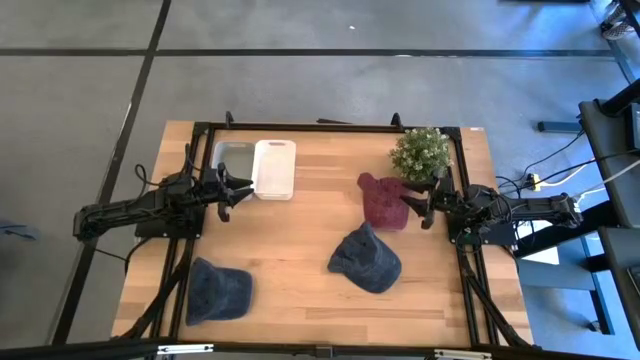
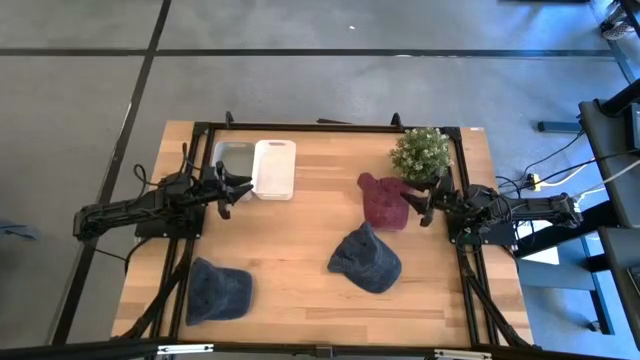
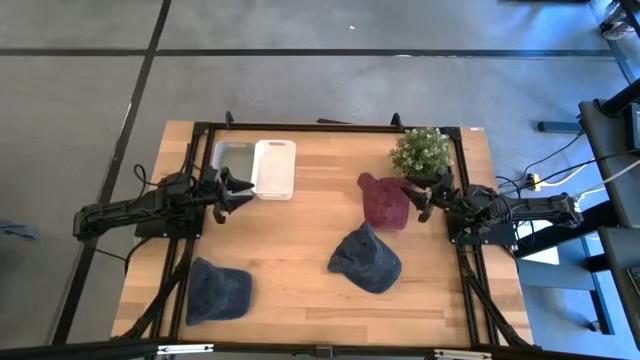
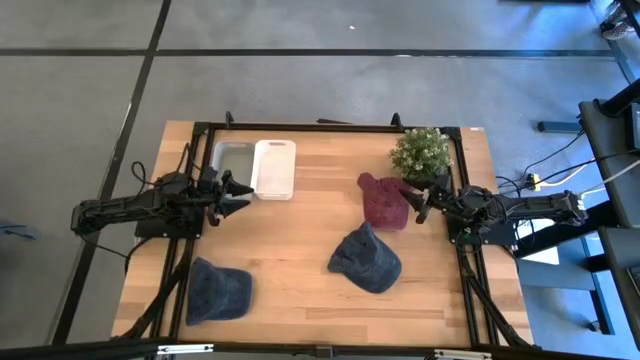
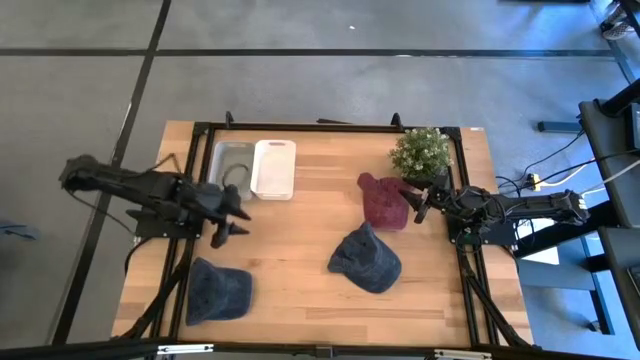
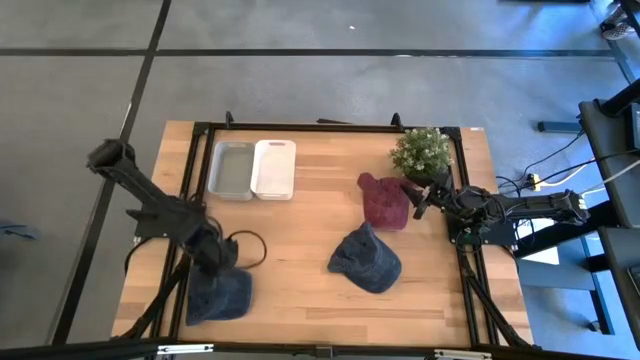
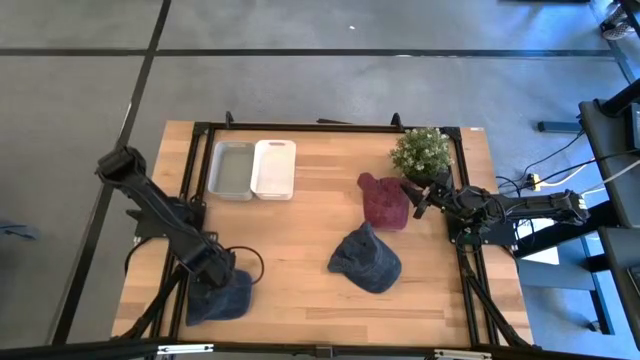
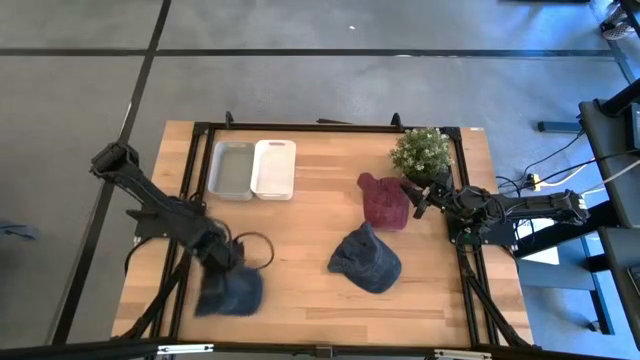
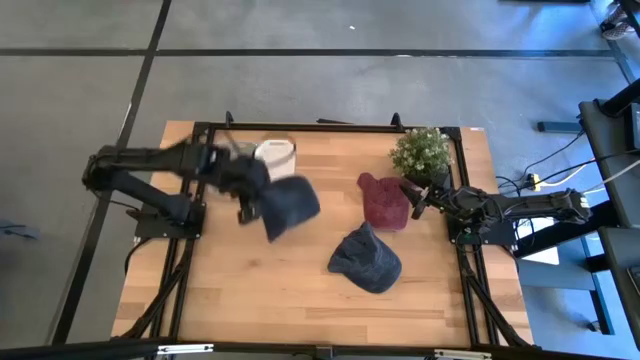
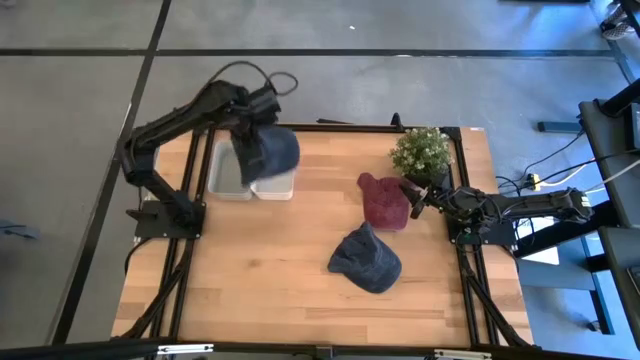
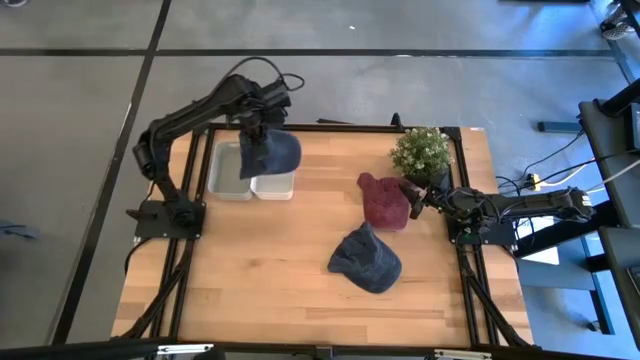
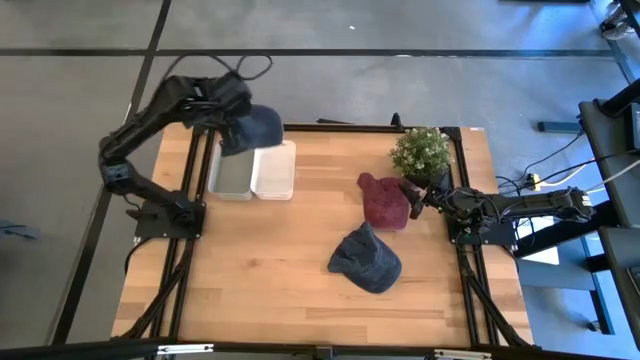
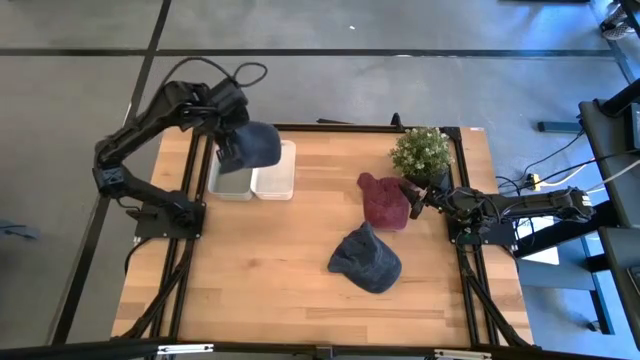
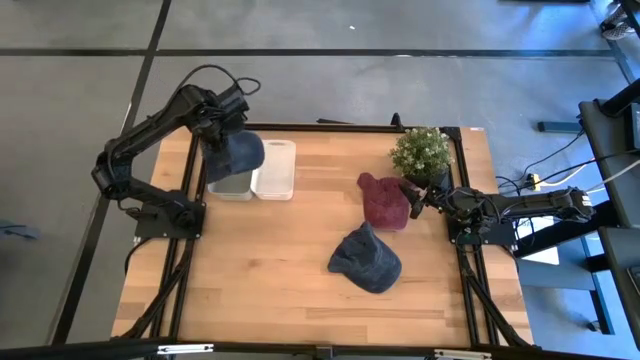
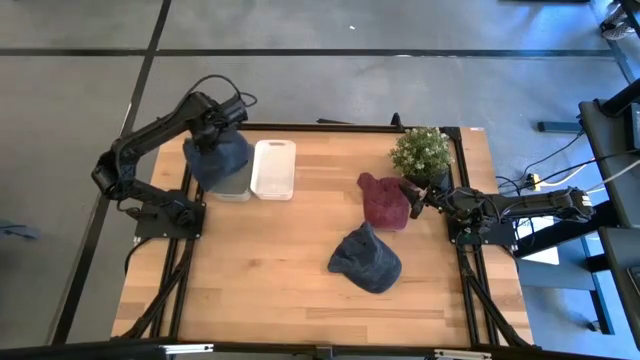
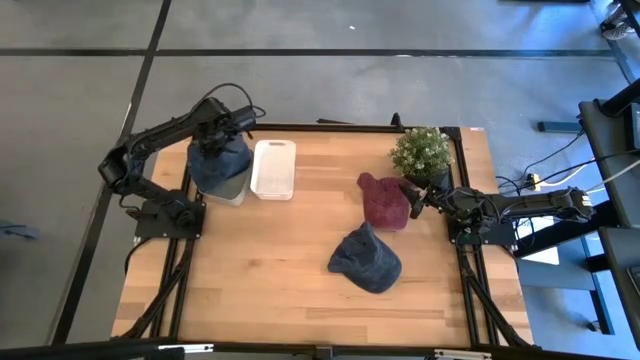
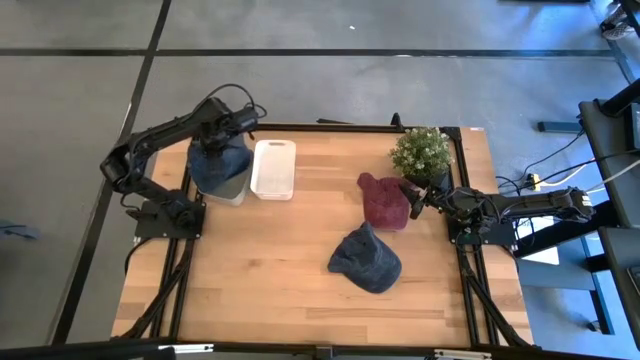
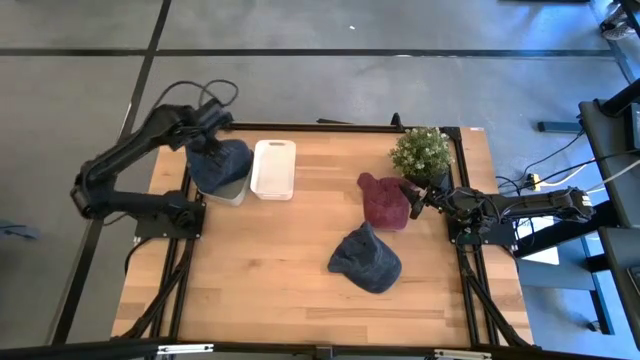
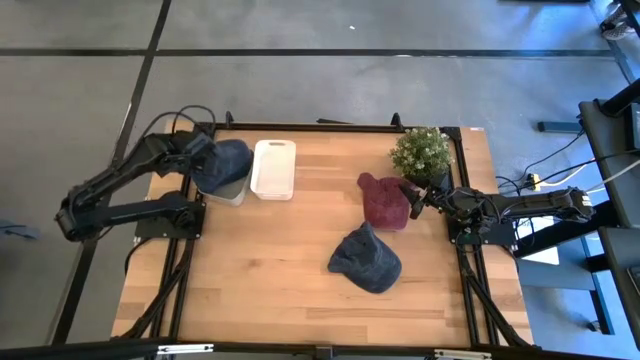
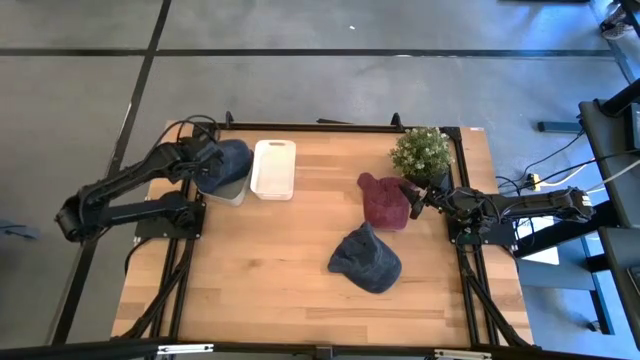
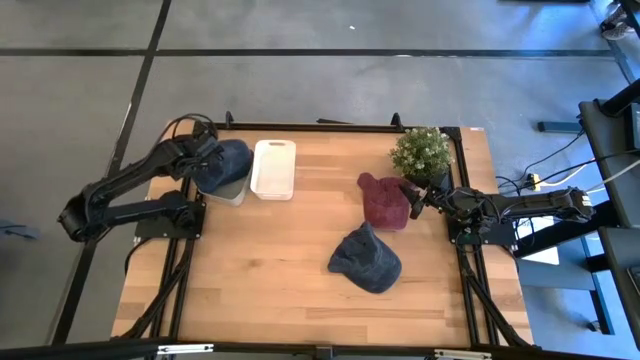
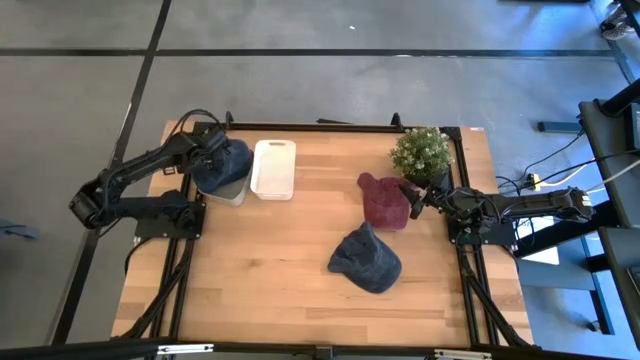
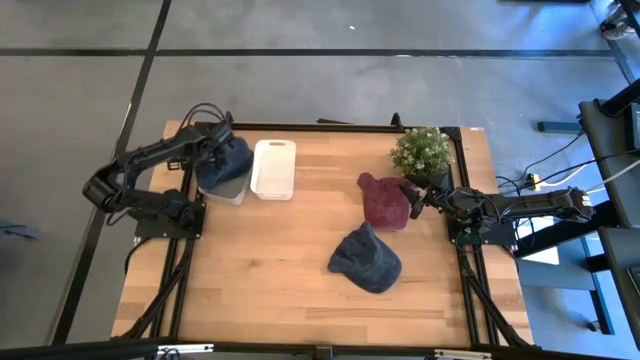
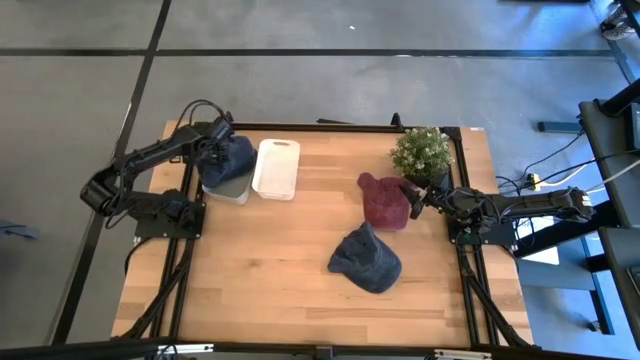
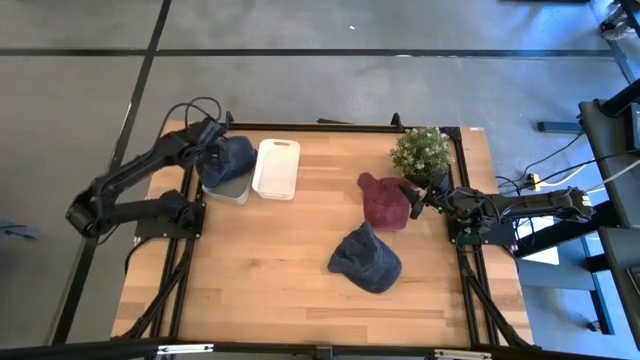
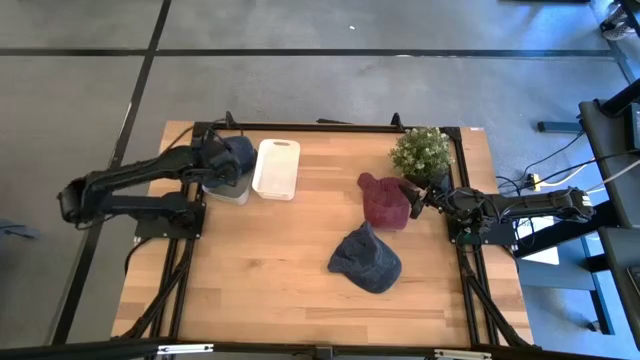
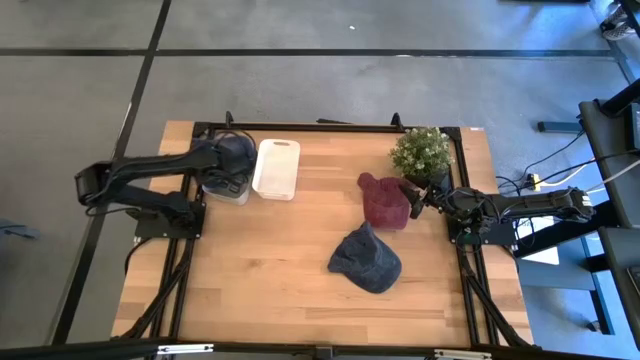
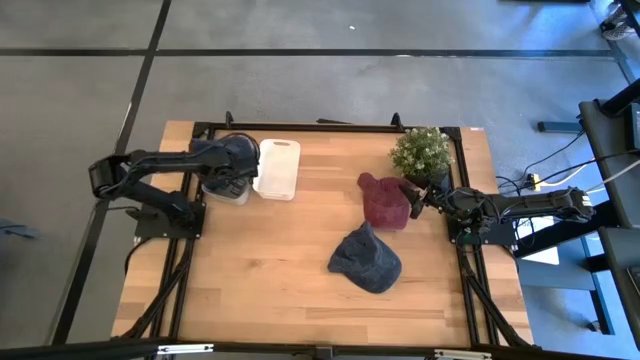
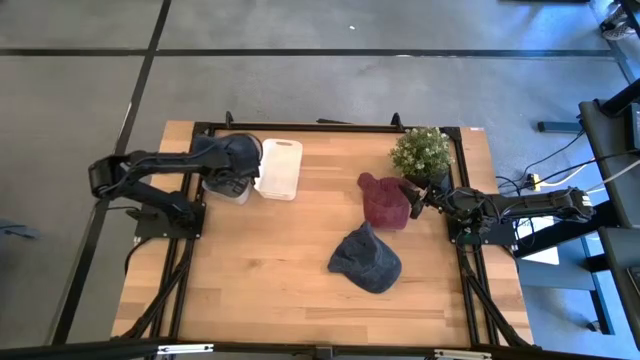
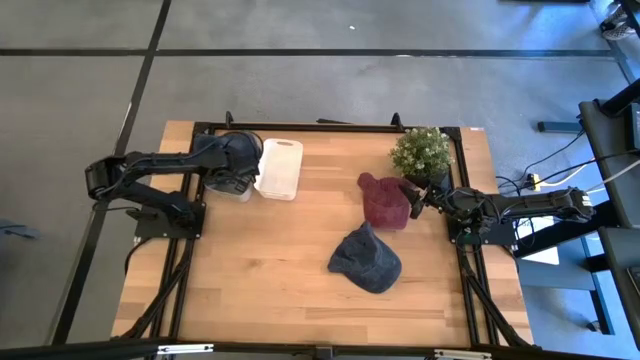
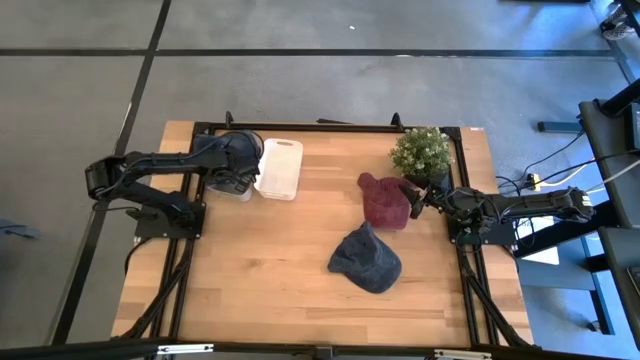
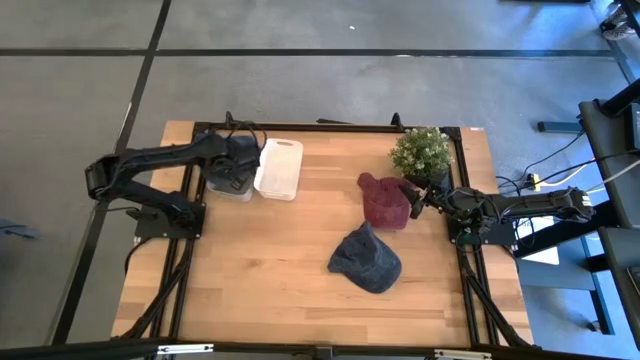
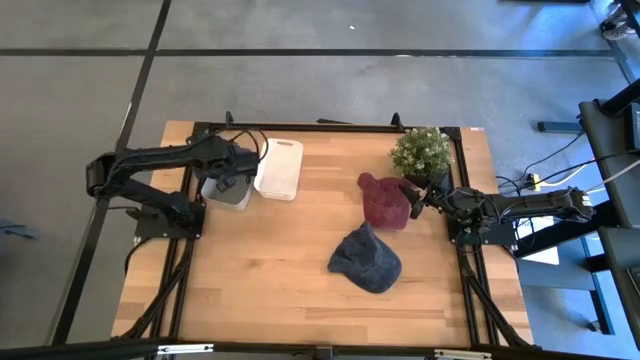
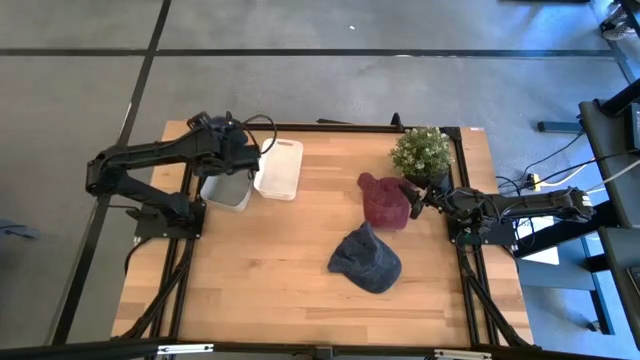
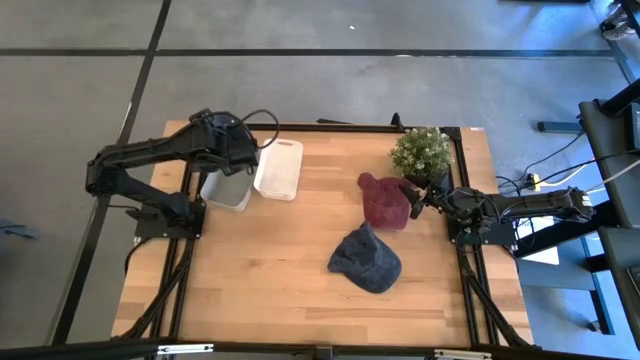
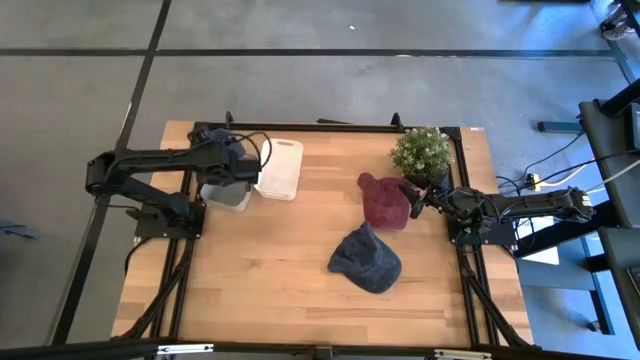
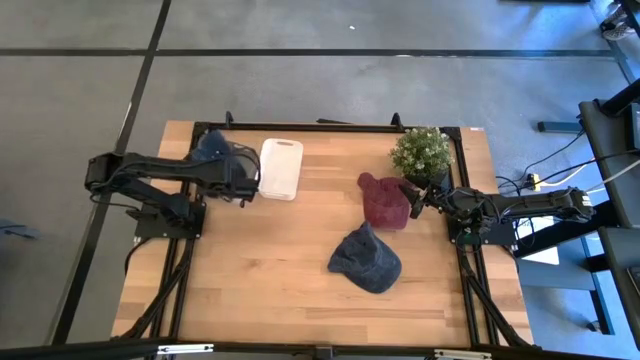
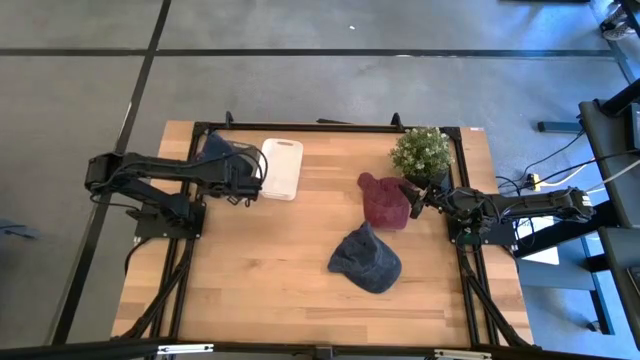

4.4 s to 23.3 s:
Task: Pick & Place hat
Put the left blue cap into the gray bin

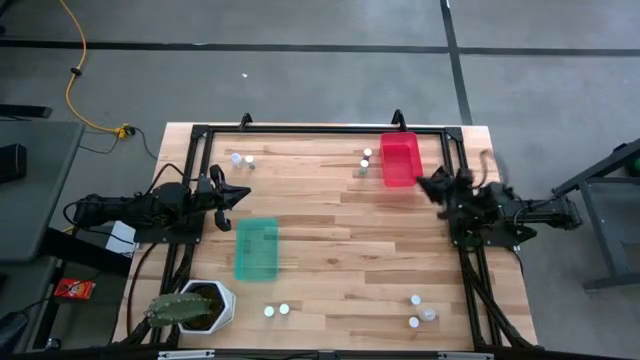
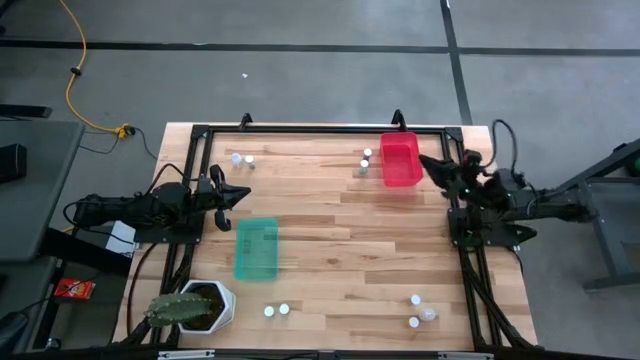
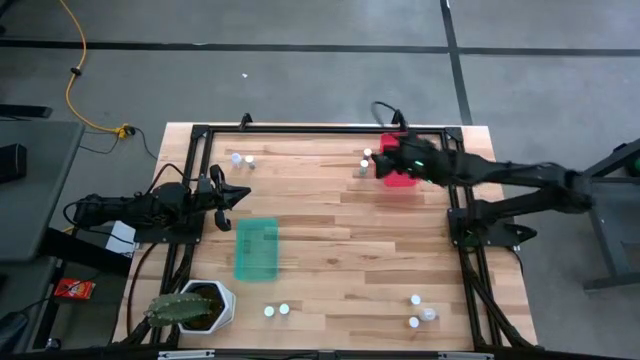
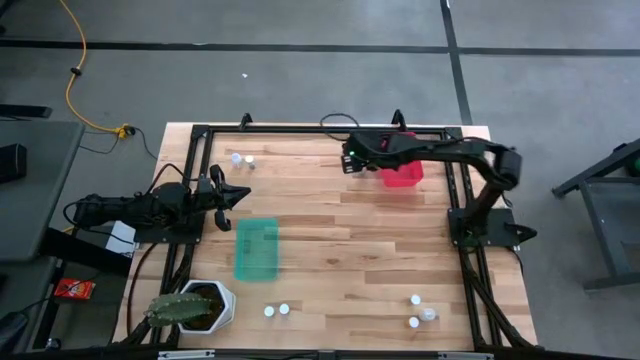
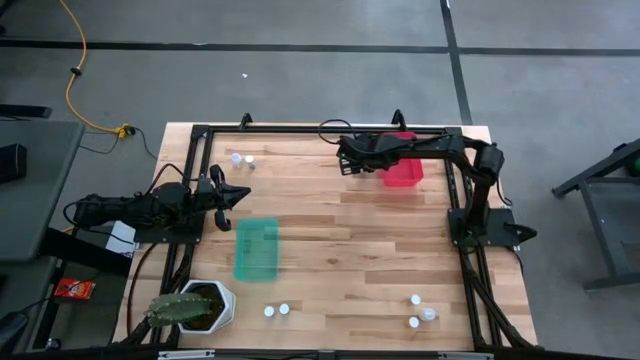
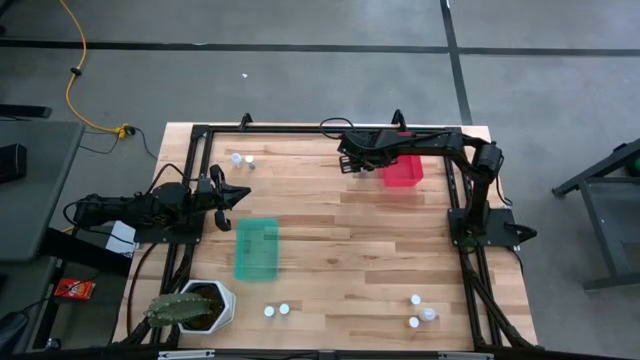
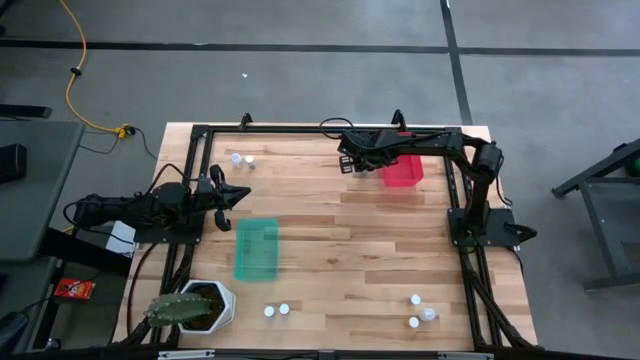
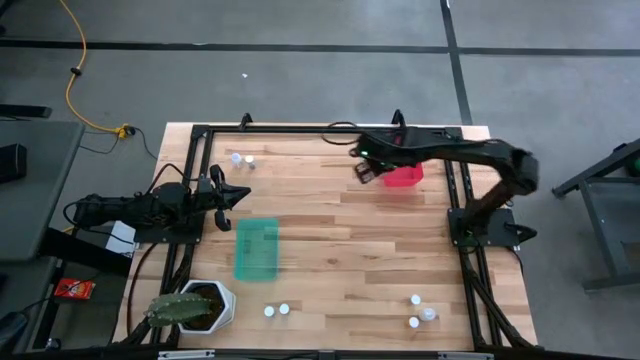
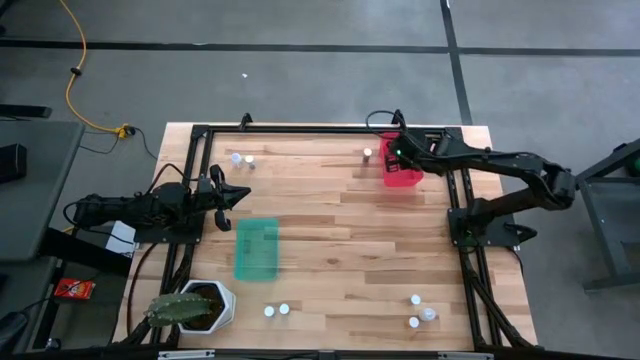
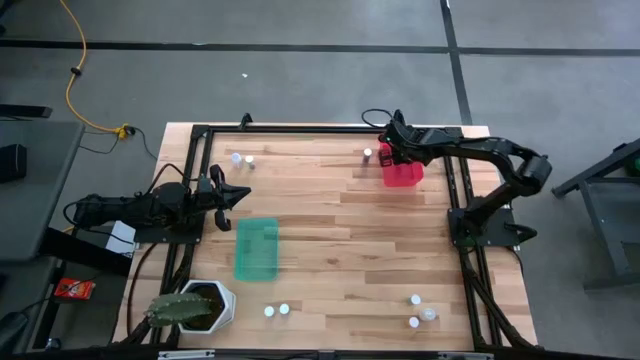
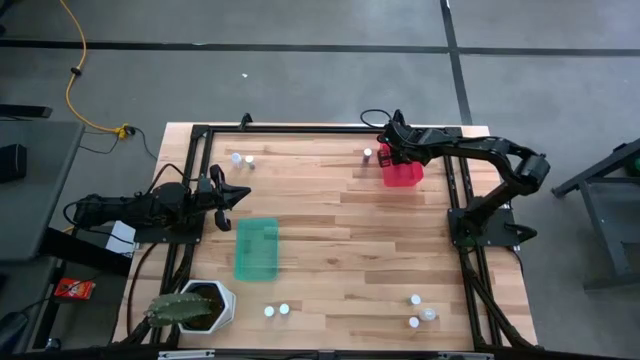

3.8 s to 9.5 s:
Task: Pick and place medicine bottles into bin by pill shape (circle, oval)
Put the light blue tablet bottle into the red bin
